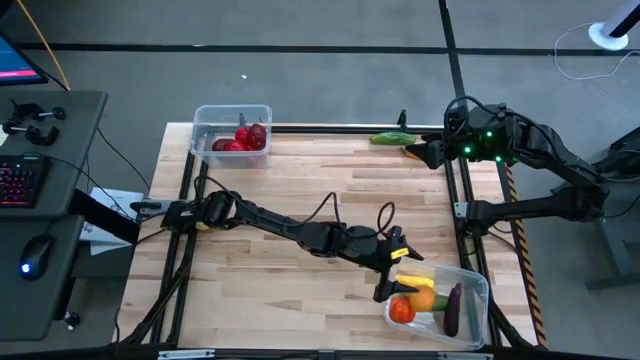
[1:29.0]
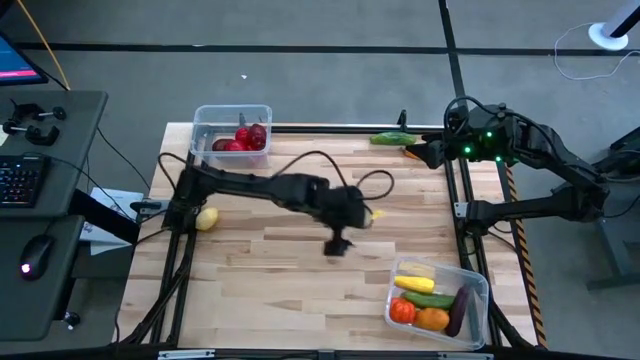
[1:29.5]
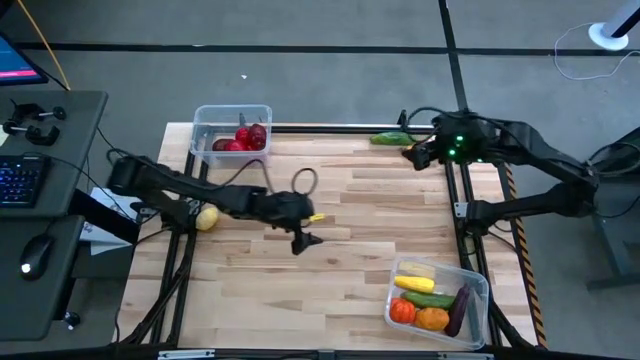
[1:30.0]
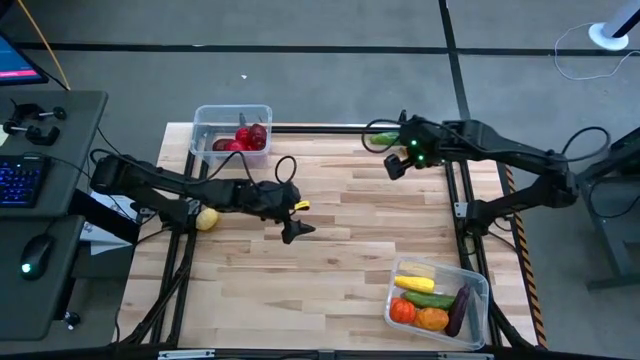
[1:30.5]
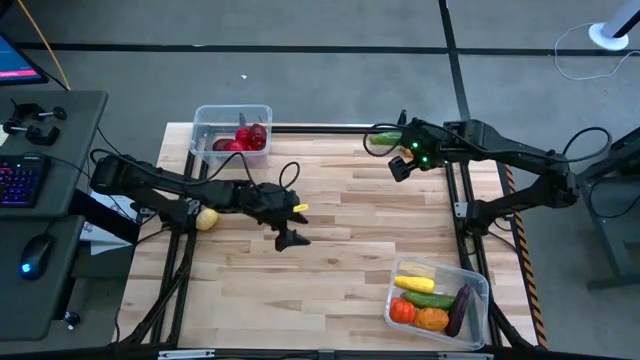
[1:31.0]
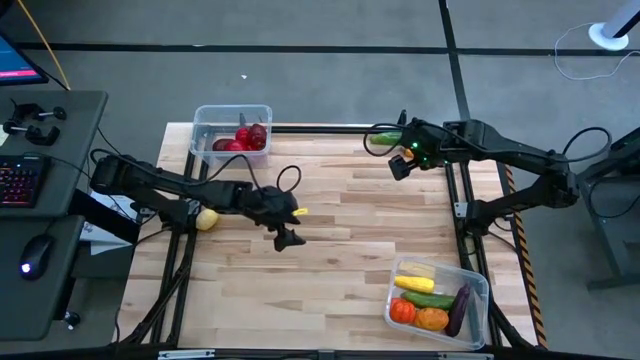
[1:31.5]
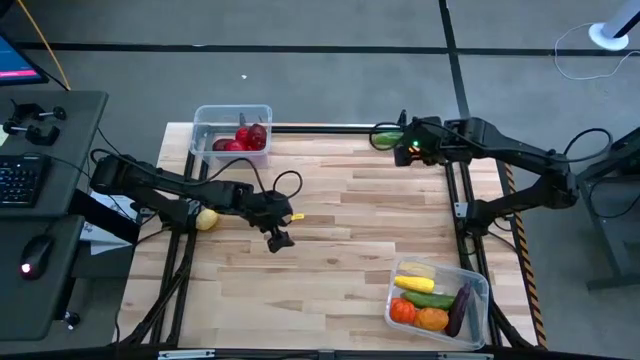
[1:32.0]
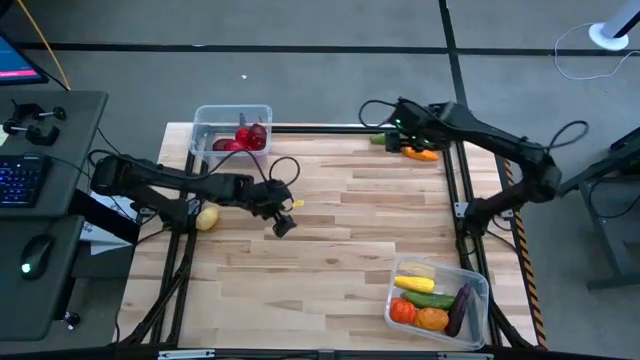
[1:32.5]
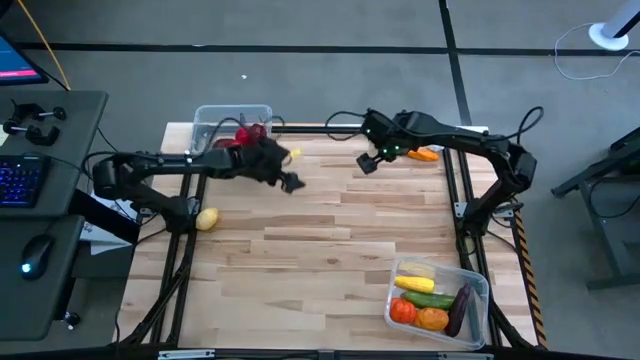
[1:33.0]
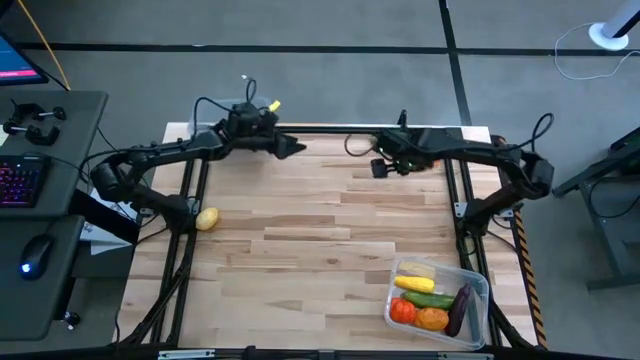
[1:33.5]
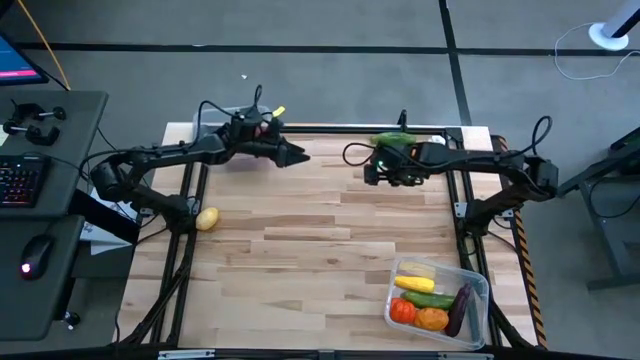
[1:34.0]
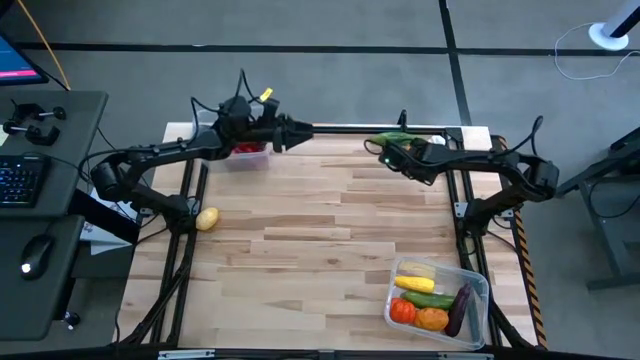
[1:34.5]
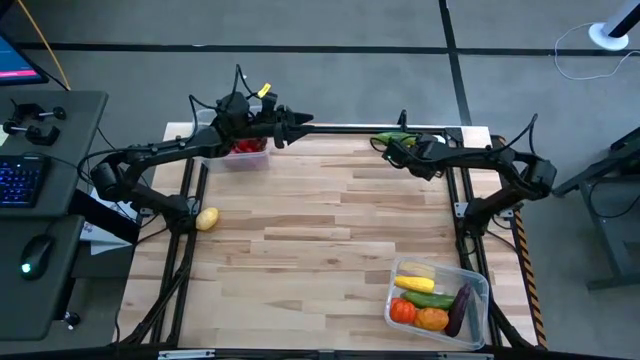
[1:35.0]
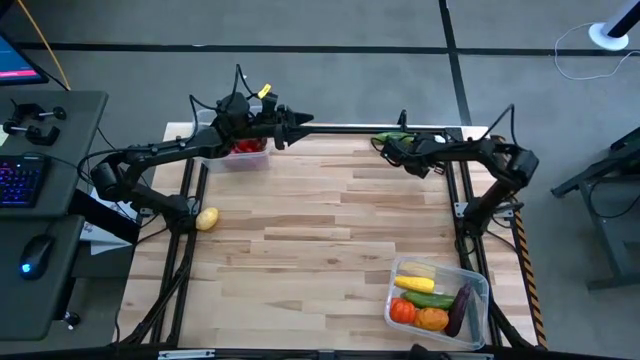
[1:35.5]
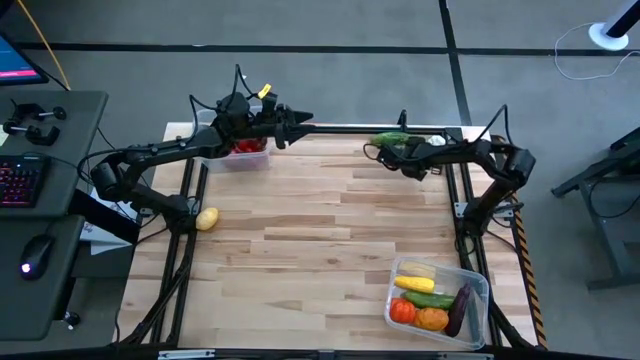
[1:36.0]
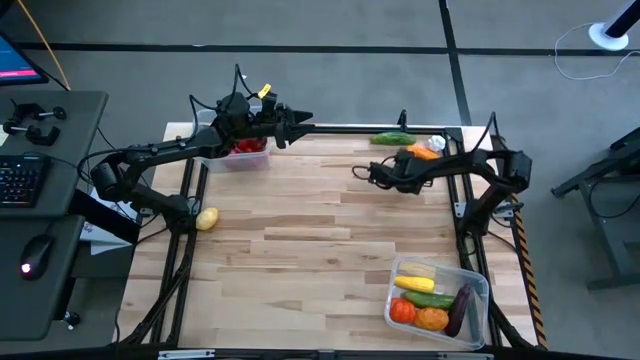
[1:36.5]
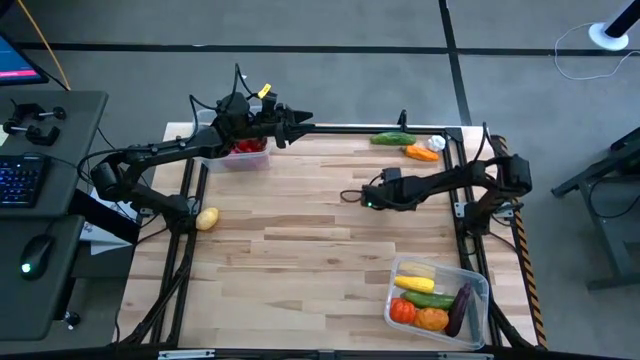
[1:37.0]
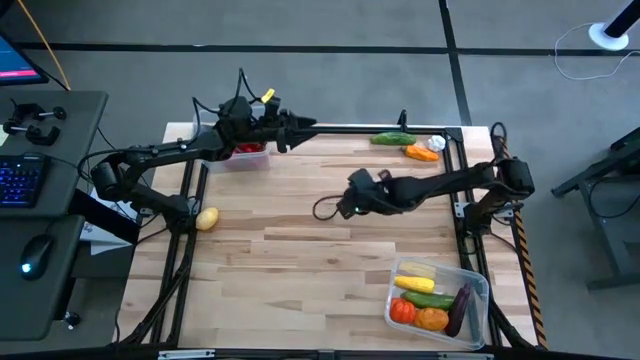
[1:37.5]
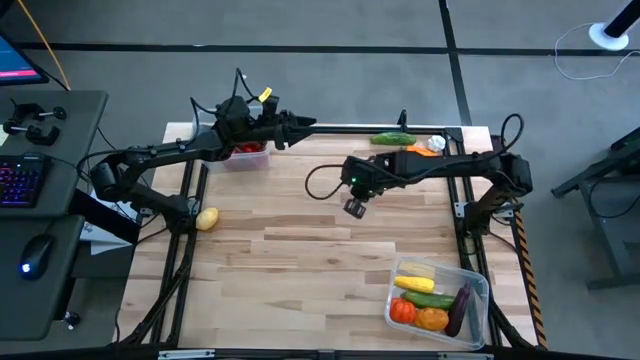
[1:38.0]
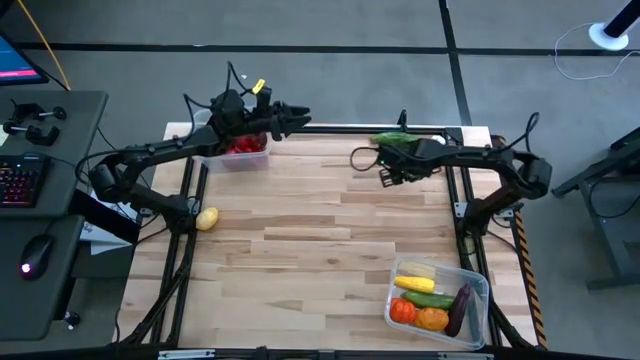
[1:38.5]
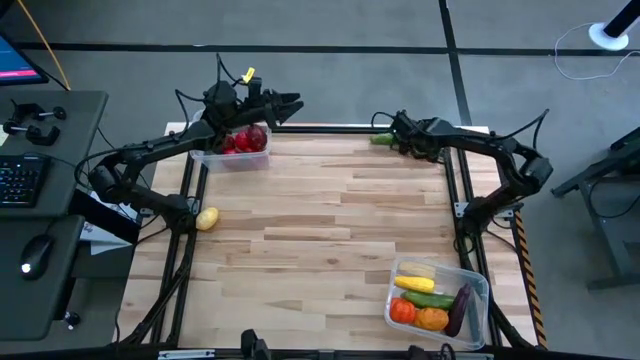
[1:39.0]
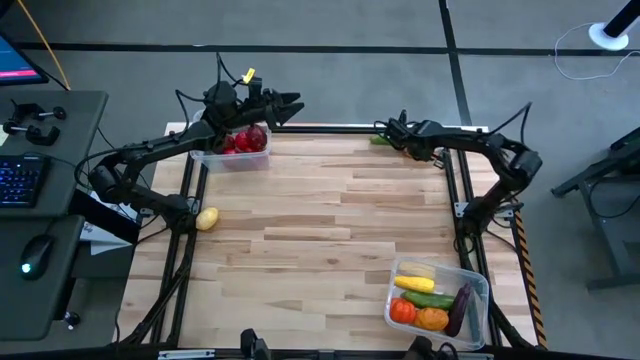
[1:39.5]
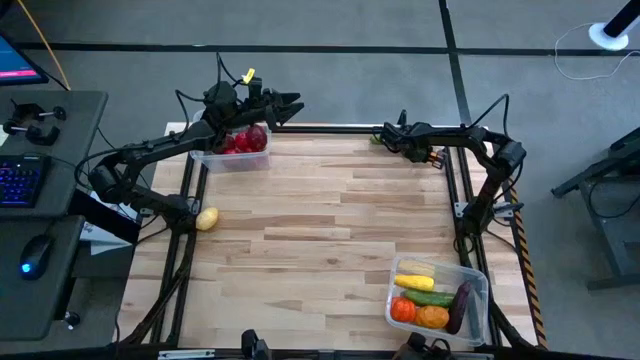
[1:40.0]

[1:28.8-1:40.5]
Task: Sort produce into baskets
Put the orange chili pepper into the bottom transparent bin

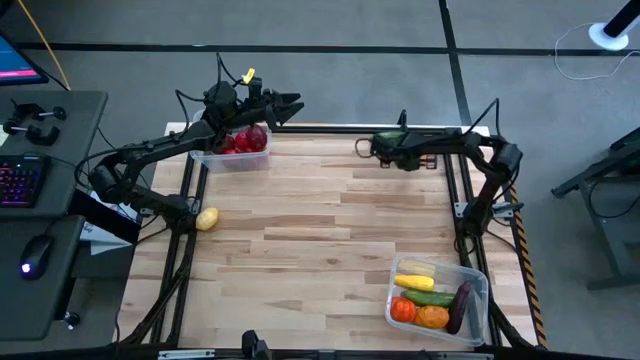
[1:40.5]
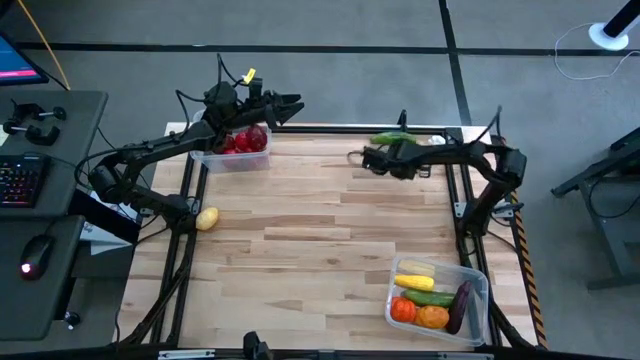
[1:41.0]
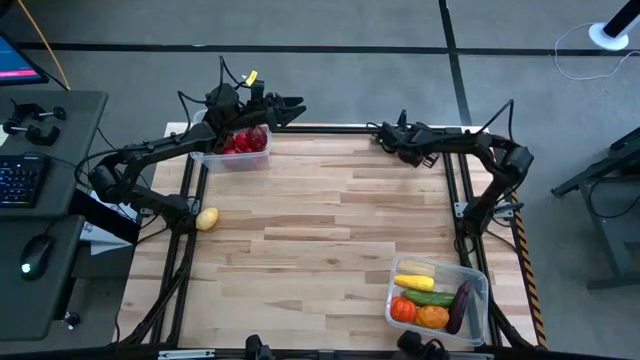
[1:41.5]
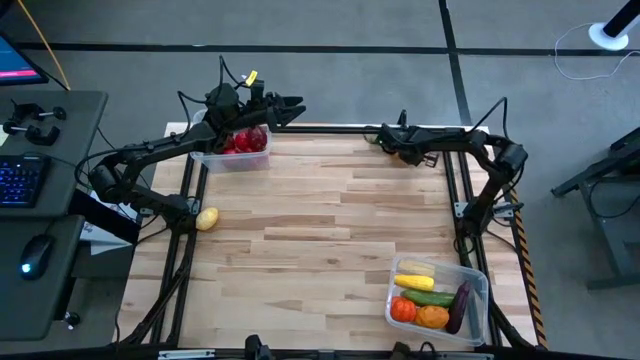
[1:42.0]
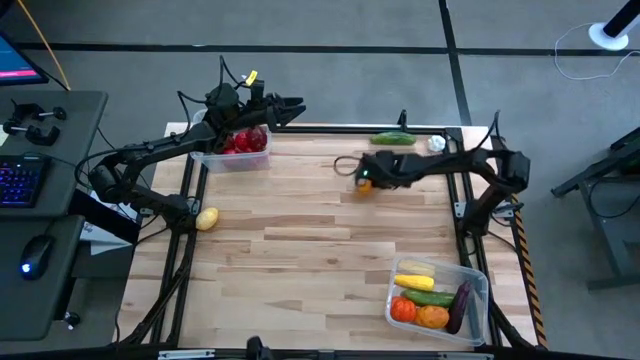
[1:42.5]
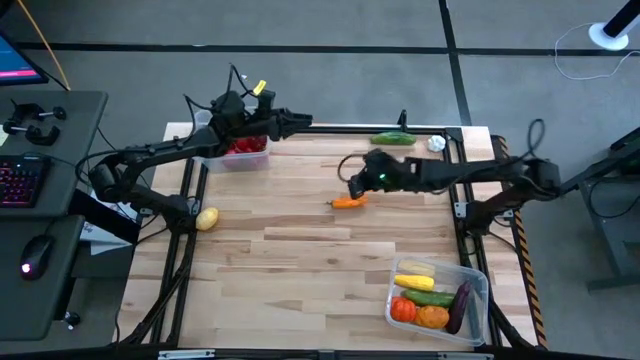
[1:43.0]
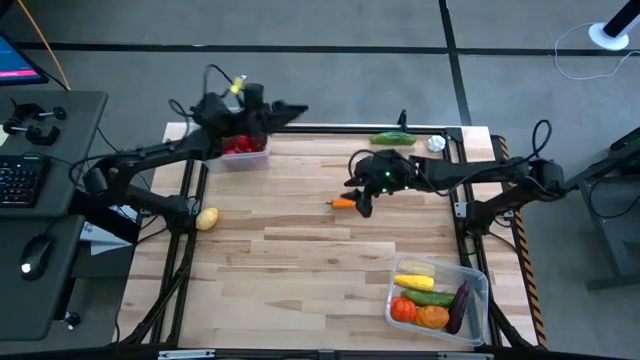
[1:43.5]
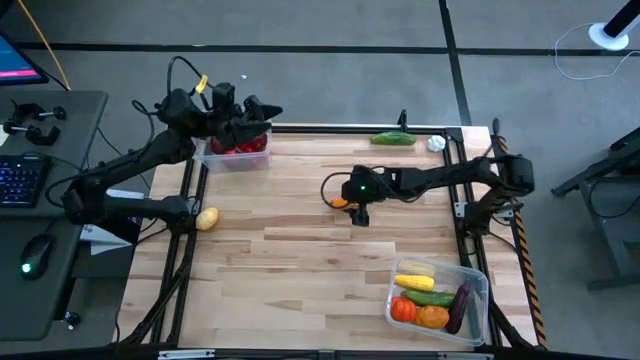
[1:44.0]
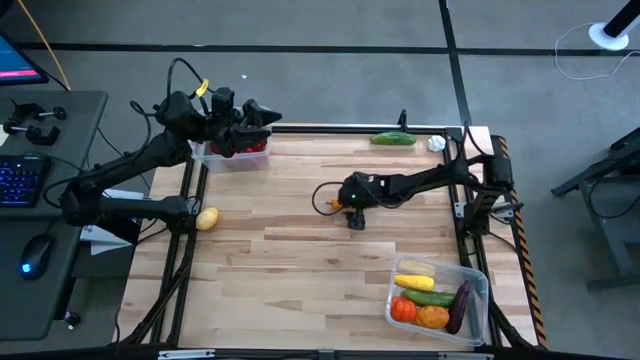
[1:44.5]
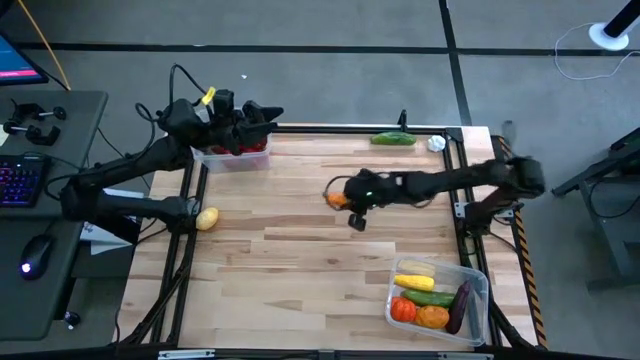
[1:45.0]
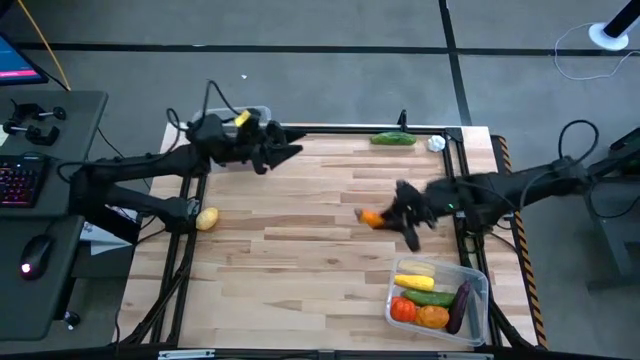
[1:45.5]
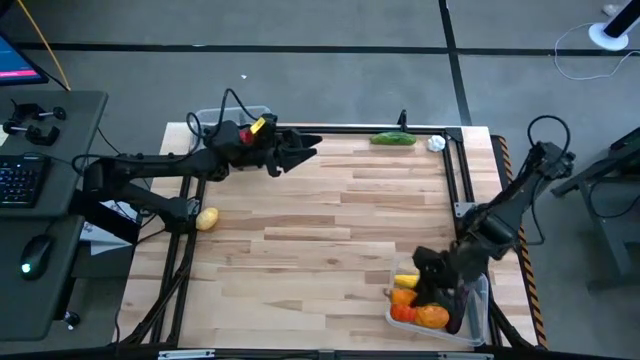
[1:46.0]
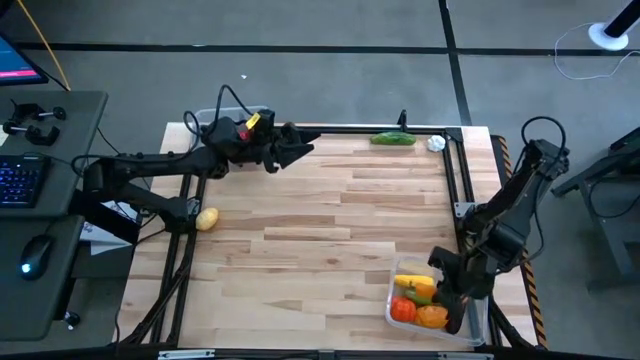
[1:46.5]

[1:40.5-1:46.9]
Put the orange chili pepper into the bottom transparent bin

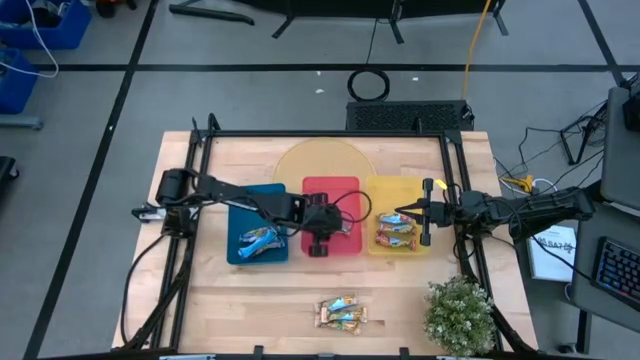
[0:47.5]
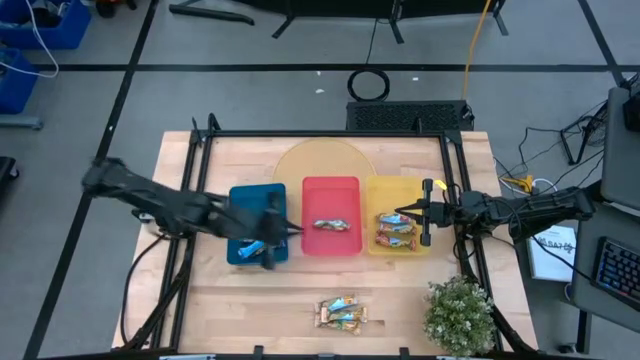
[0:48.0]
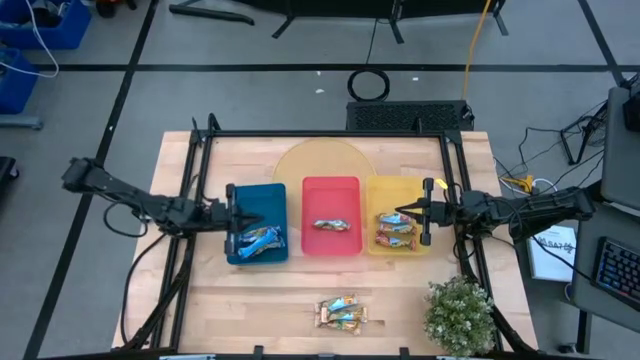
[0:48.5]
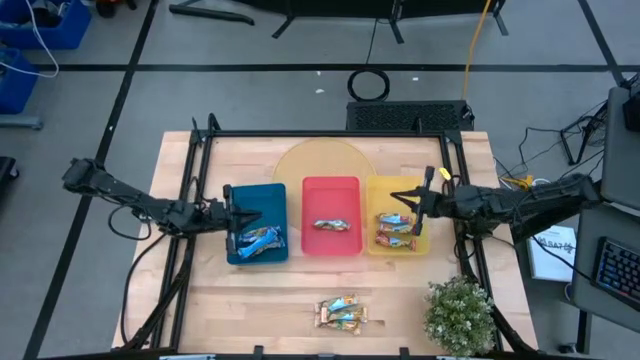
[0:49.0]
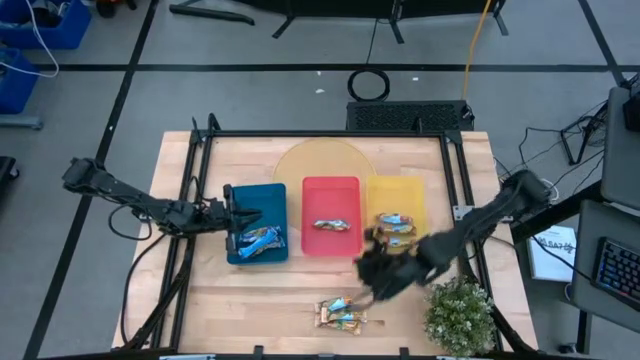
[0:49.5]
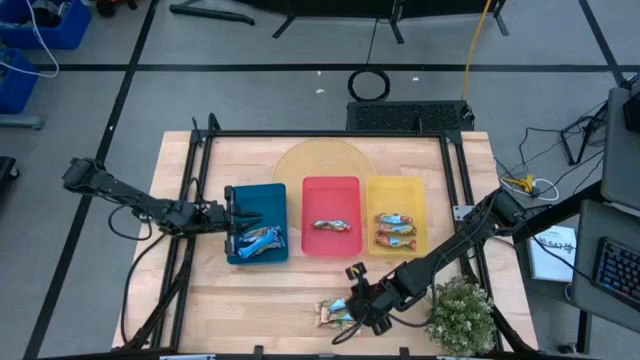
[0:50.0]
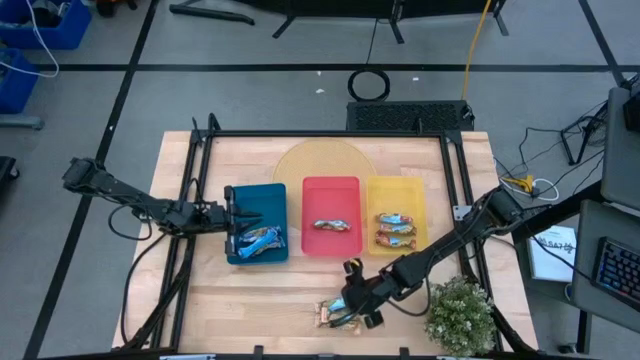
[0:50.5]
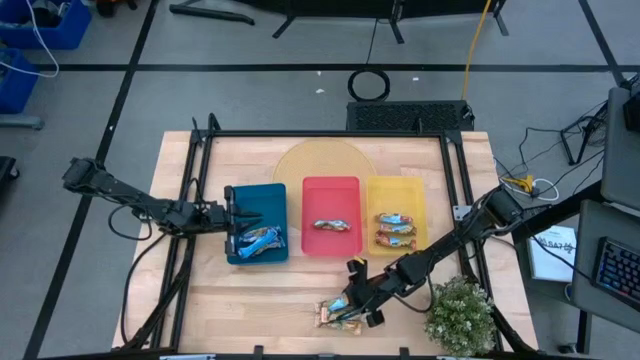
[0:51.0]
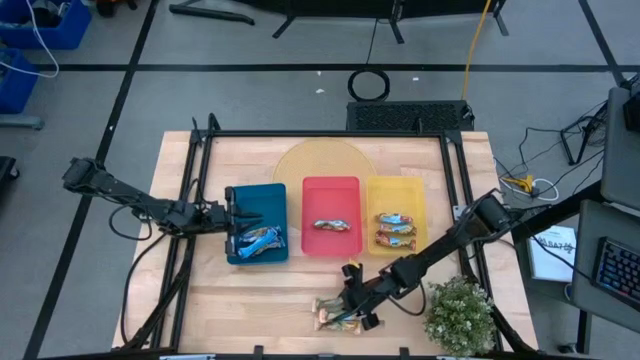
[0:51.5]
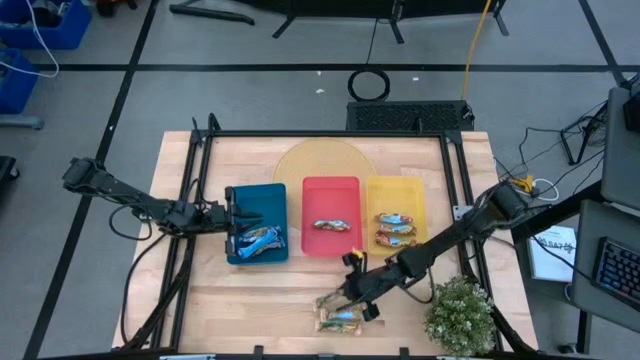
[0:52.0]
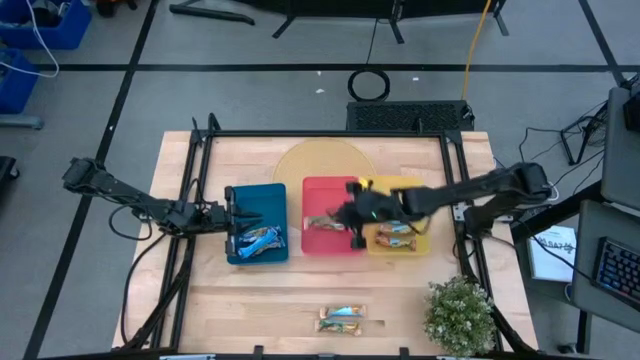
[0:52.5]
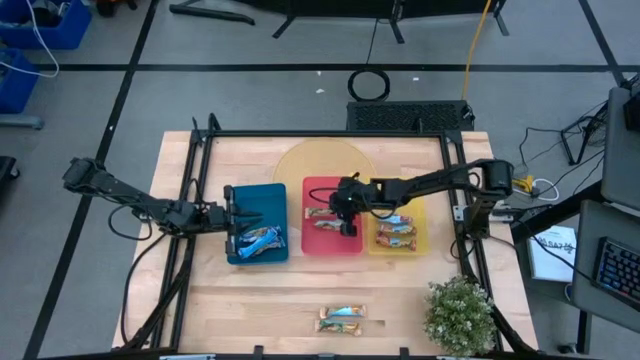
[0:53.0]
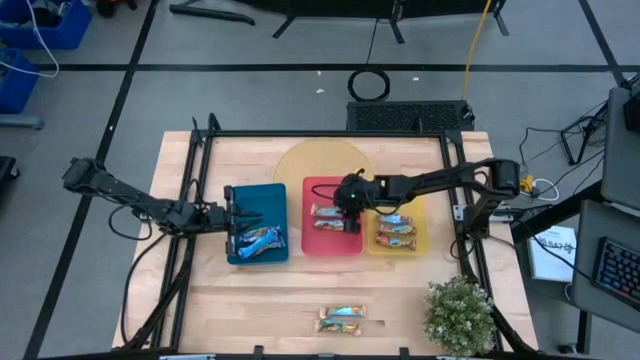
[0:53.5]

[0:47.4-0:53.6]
Task: Pick and place Granola Bars by type
Put the top yellow granola bar into the red bin
